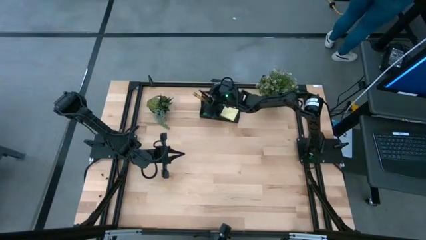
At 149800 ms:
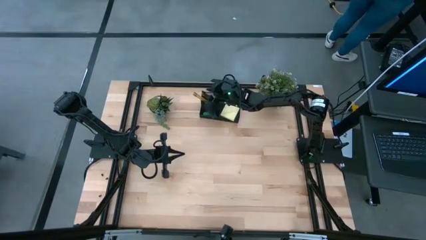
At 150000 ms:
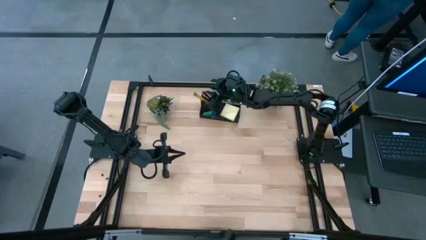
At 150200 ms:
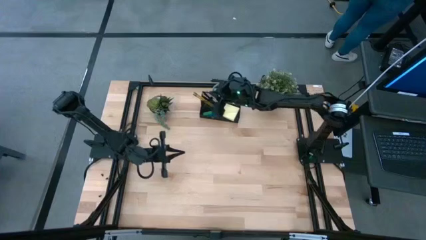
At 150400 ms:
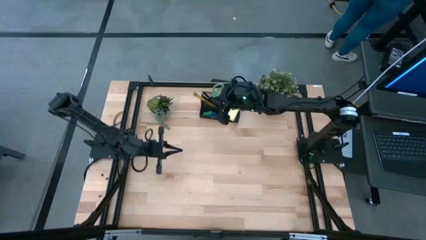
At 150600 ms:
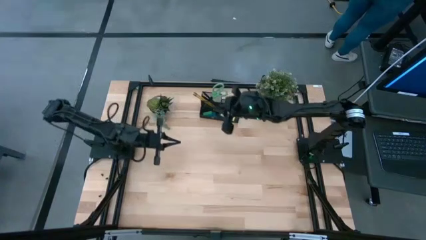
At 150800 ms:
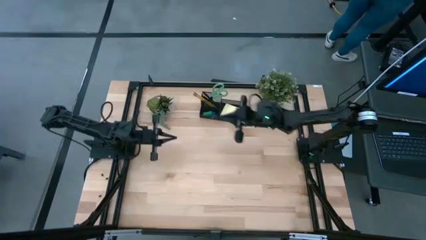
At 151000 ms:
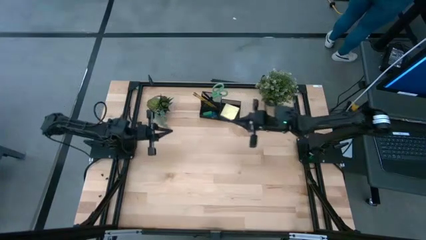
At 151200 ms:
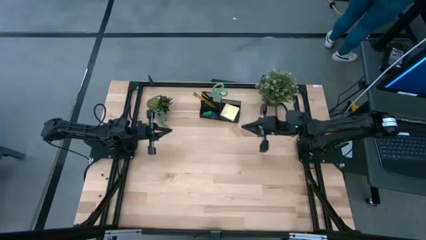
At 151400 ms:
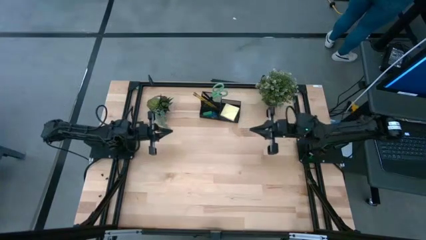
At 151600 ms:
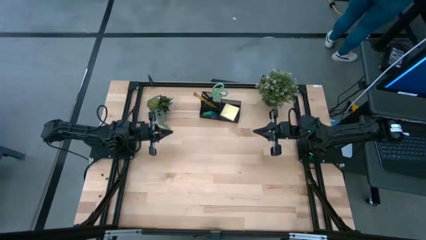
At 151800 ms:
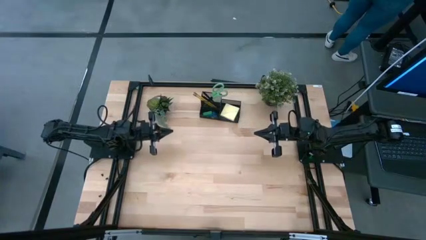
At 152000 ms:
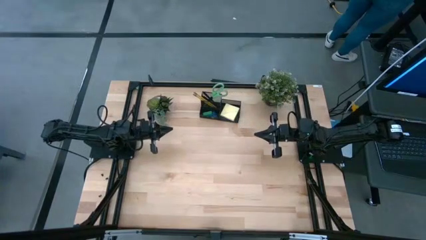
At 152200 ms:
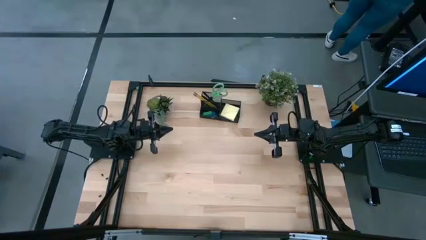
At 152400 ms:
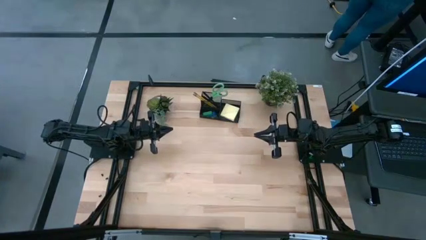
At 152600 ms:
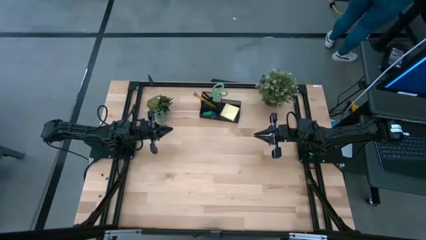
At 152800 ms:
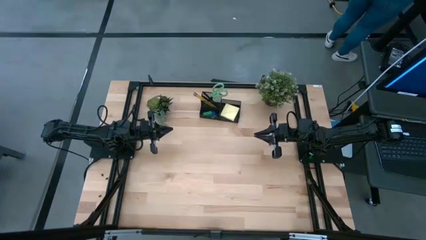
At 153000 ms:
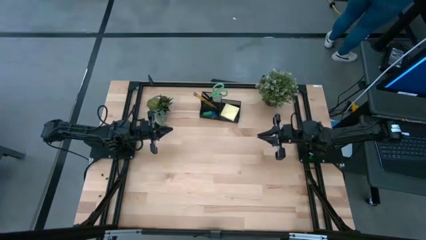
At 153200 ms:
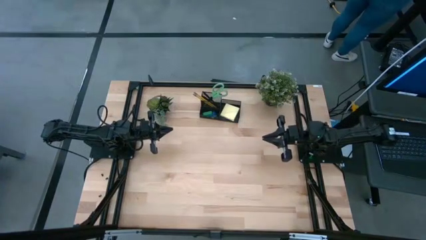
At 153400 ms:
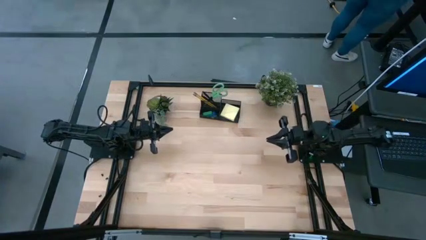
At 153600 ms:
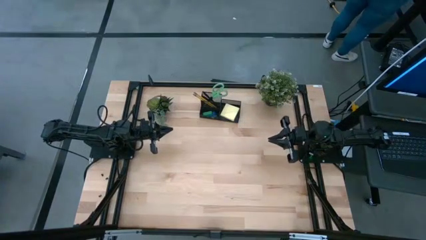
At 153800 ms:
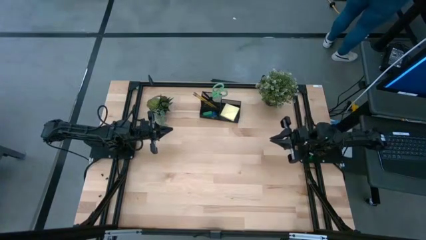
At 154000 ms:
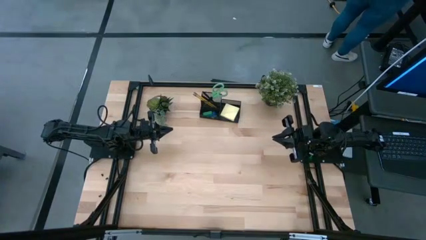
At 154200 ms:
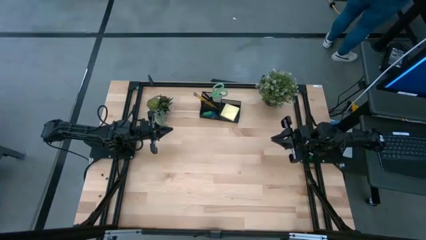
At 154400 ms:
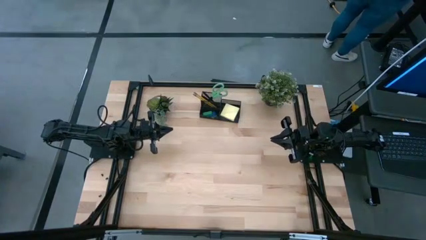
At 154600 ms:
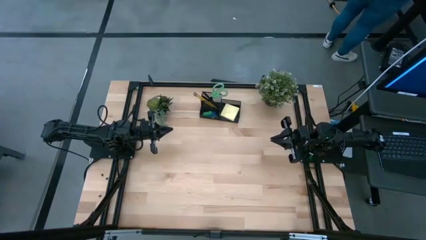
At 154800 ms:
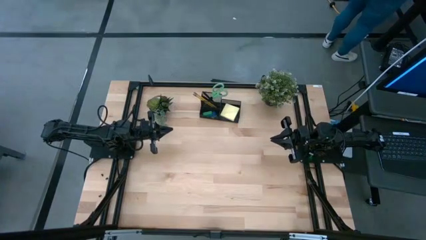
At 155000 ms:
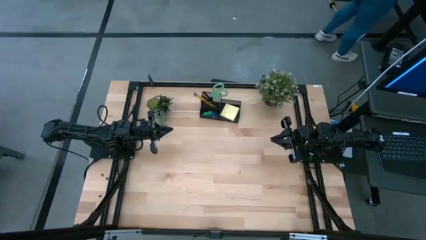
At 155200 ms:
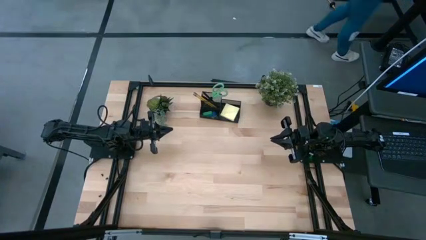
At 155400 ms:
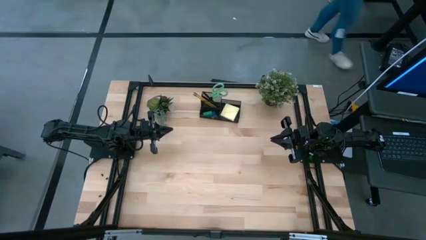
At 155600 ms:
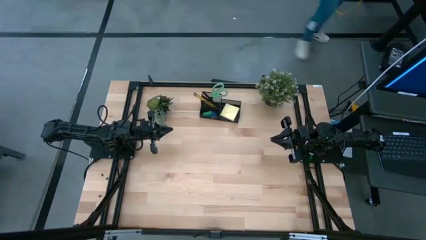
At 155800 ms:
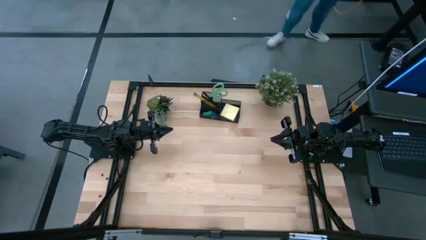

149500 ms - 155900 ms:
Task: Pick and place office supplies into organizer
Return To Home Position

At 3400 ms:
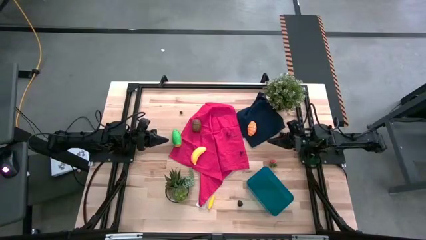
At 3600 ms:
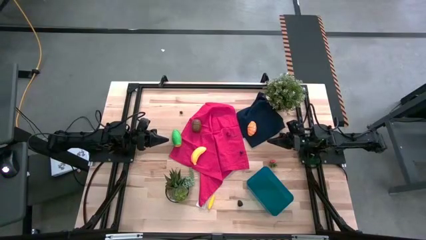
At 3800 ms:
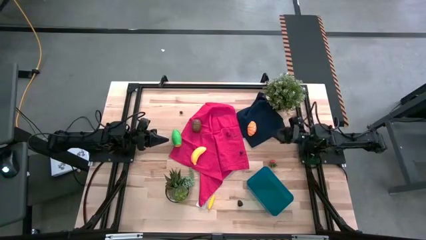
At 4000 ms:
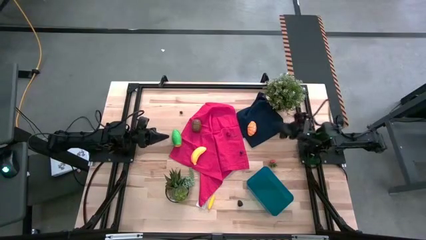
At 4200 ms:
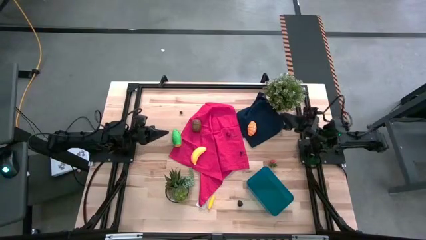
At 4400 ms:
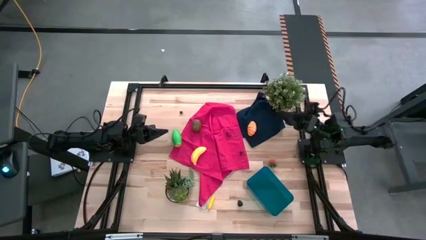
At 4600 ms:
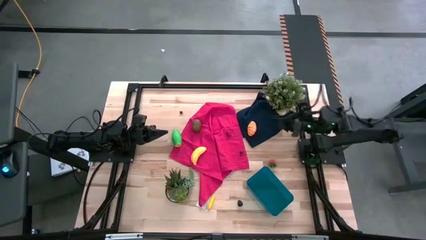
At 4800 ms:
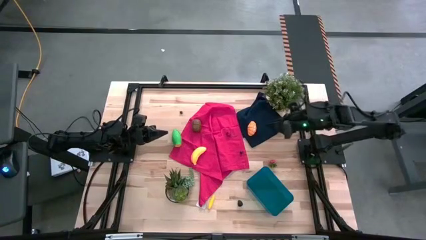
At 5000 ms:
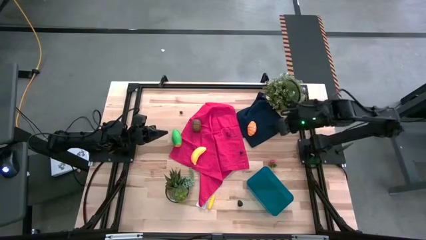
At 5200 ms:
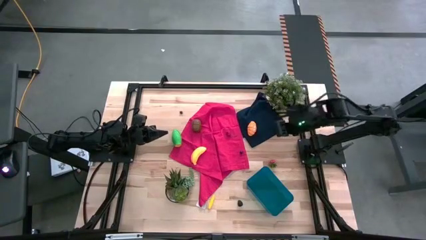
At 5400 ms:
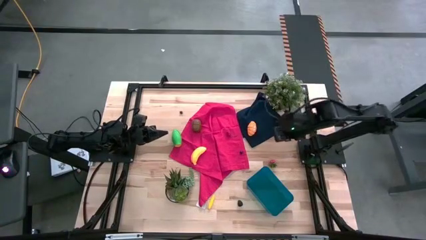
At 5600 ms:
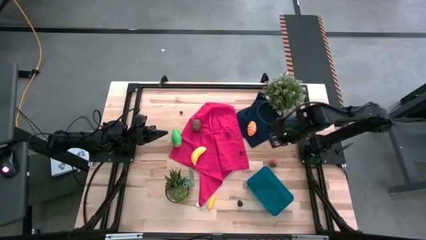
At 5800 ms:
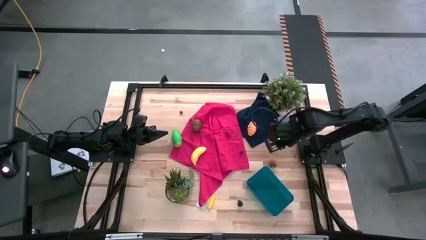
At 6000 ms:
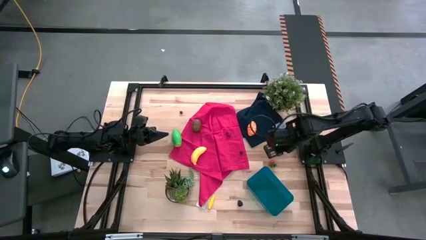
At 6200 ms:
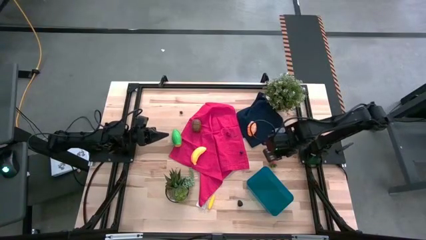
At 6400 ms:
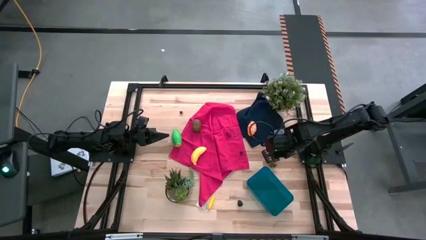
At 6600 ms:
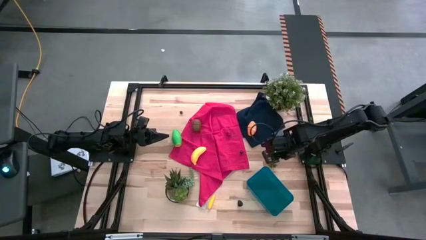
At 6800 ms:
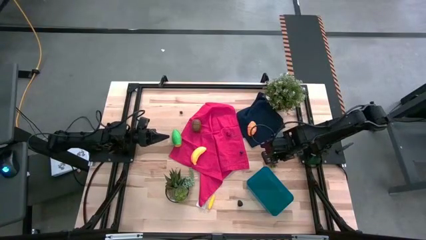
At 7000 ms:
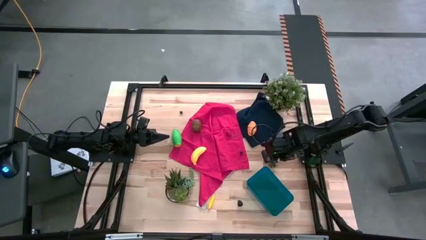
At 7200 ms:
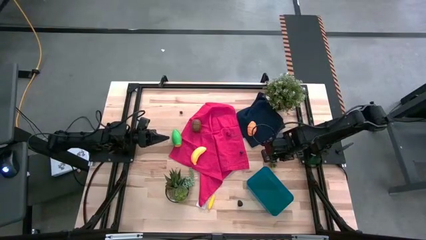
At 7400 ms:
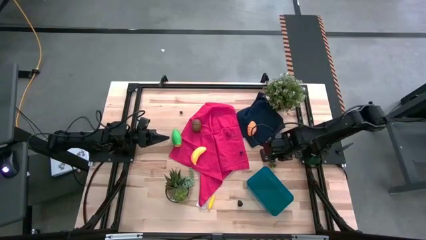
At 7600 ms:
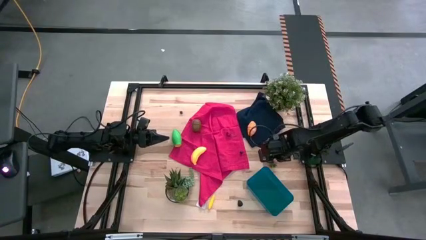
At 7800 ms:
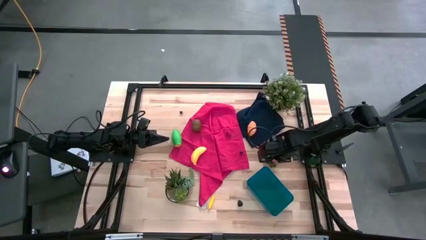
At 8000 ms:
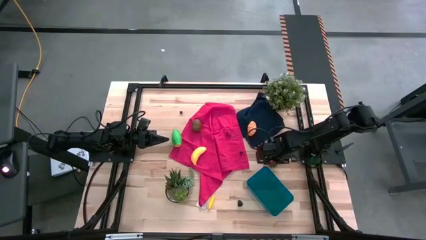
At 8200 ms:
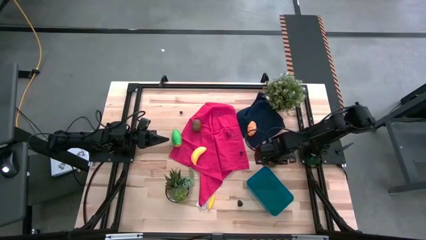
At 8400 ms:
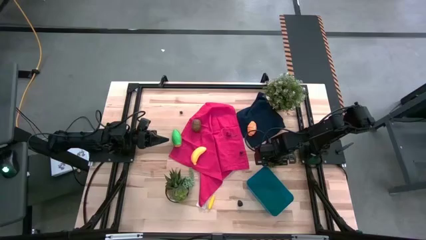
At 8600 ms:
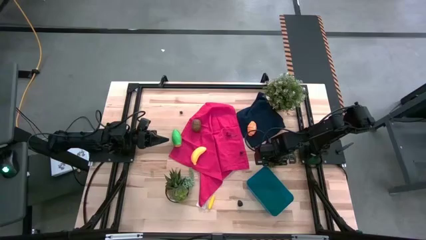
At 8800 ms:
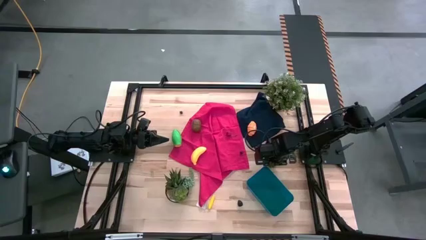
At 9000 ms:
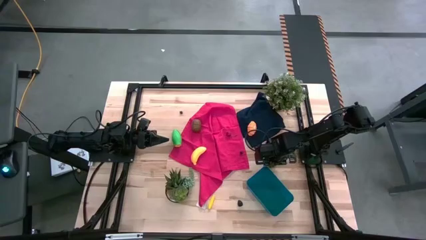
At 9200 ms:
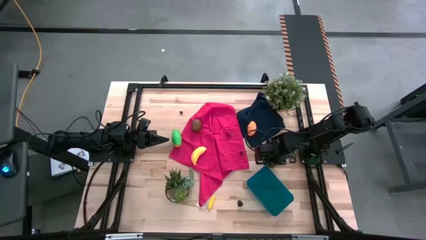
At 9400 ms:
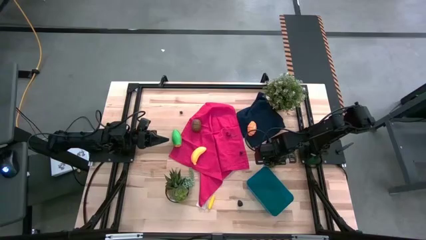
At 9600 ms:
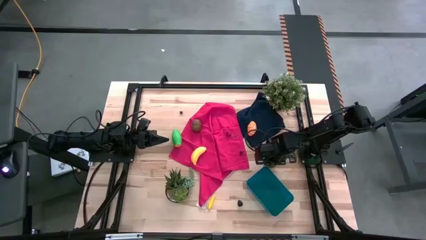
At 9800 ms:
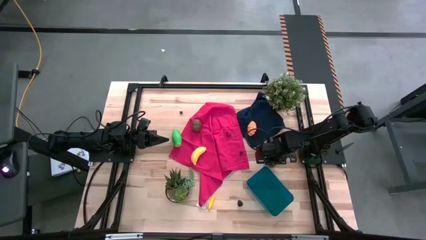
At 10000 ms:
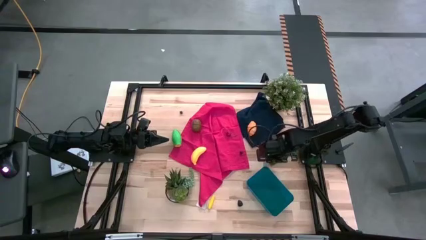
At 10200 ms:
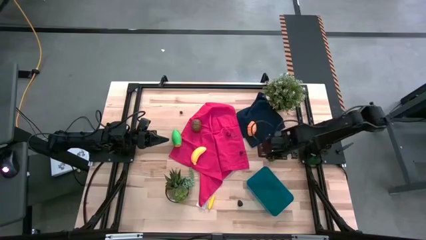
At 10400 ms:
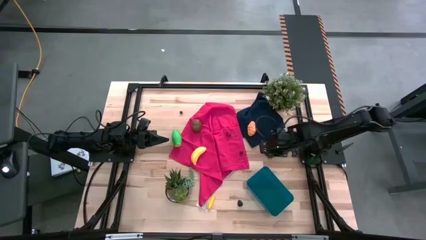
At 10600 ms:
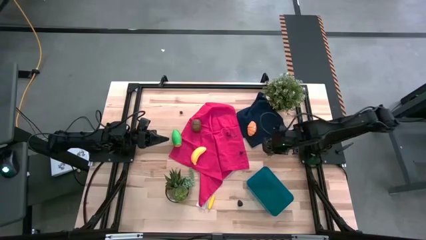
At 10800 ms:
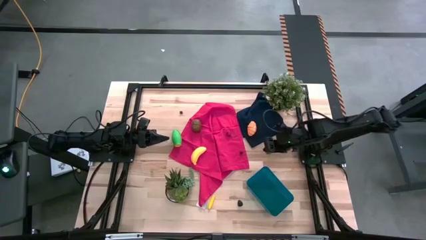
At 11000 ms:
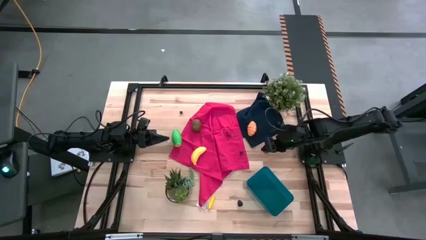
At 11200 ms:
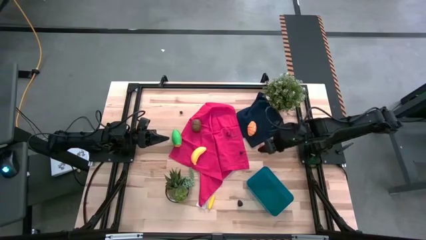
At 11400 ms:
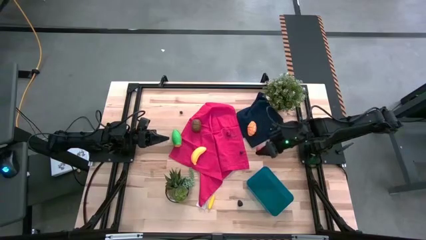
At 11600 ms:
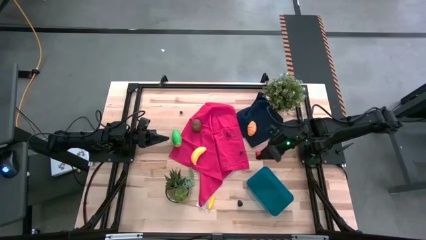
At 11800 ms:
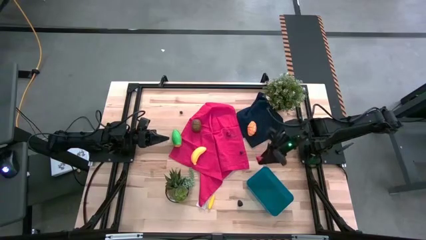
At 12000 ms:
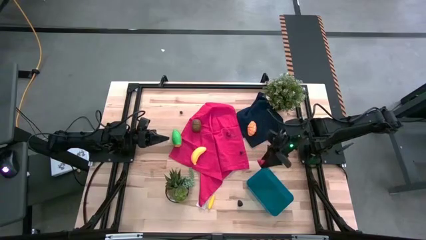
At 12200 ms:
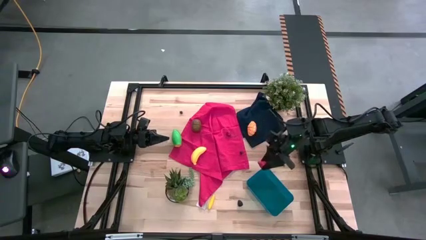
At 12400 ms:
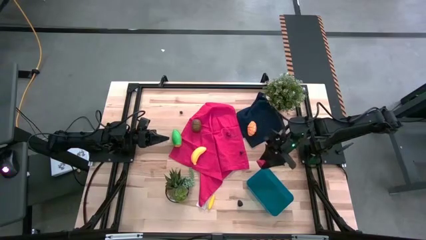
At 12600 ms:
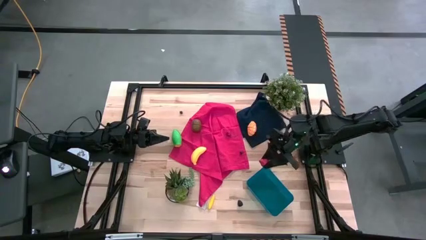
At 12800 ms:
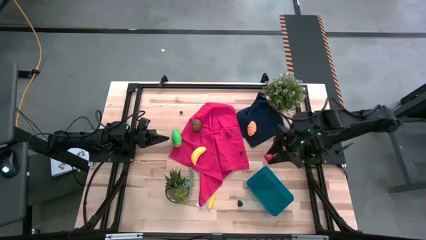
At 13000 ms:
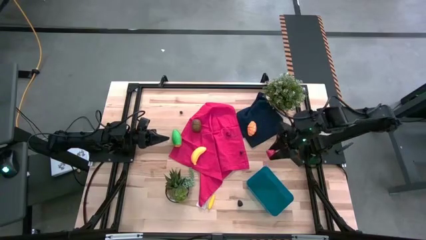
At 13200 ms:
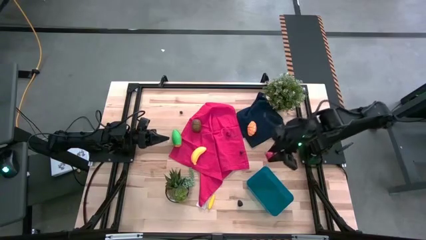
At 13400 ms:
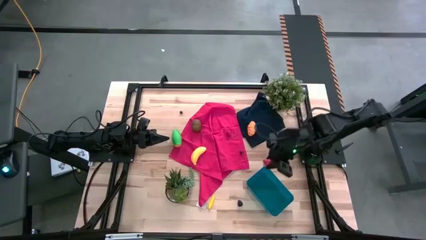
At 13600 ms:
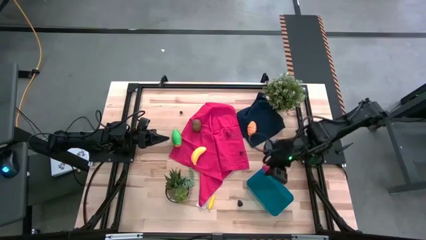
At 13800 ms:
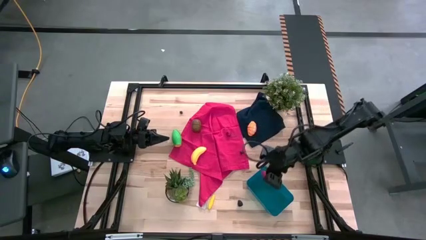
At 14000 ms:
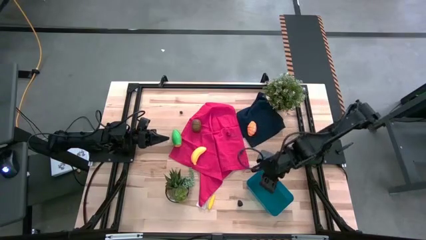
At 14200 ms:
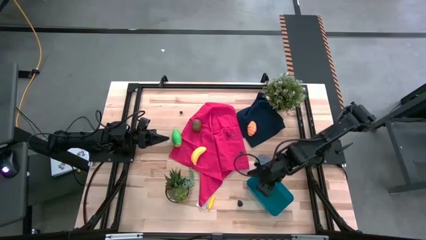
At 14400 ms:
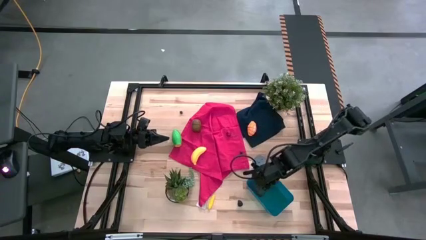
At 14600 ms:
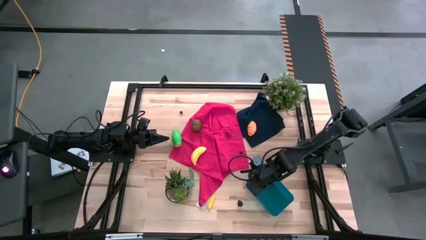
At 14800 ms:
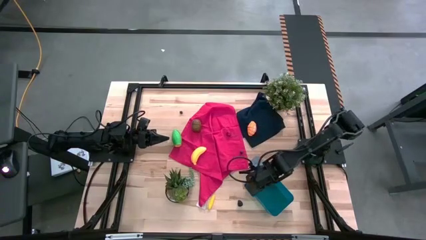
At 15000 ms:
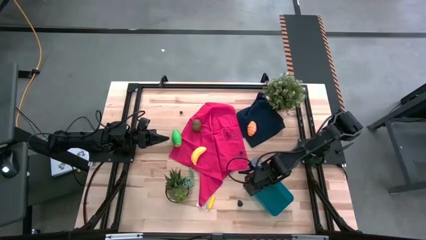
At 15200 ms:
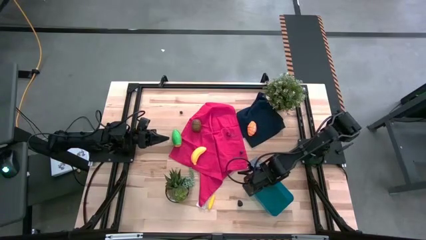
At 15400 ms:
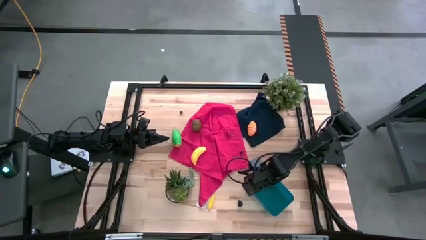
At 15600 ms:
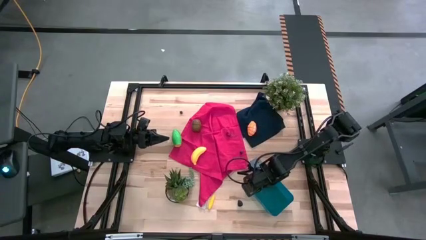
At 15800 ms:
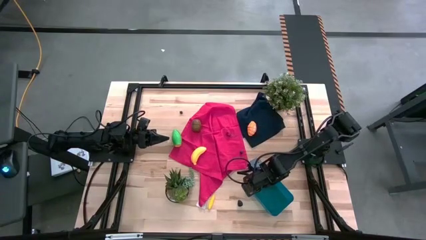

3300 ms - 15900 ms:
Task: Pick and placing Produce into tupperware
Put the strawberry into the blue bin
